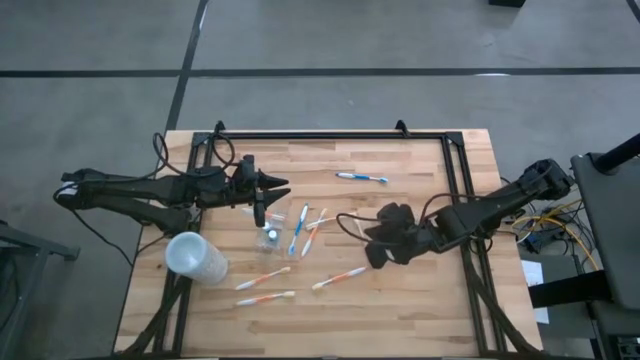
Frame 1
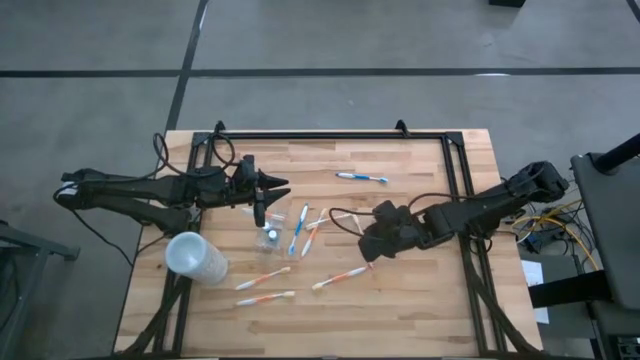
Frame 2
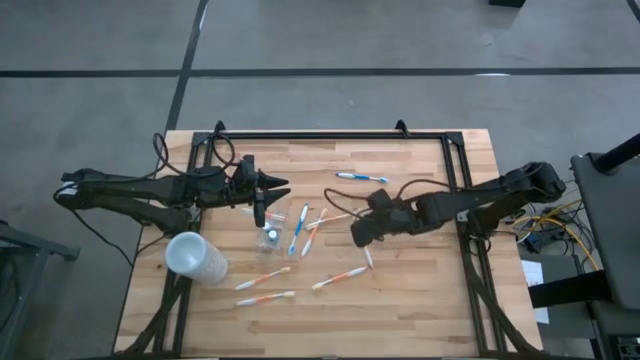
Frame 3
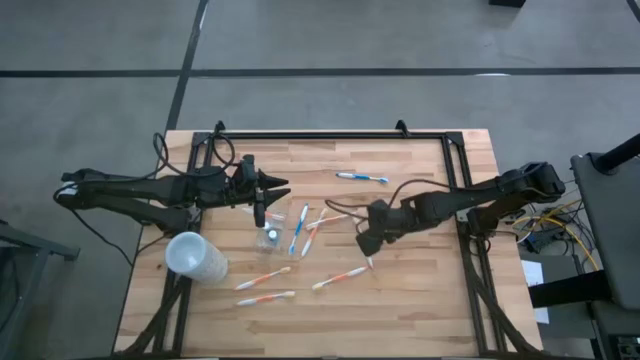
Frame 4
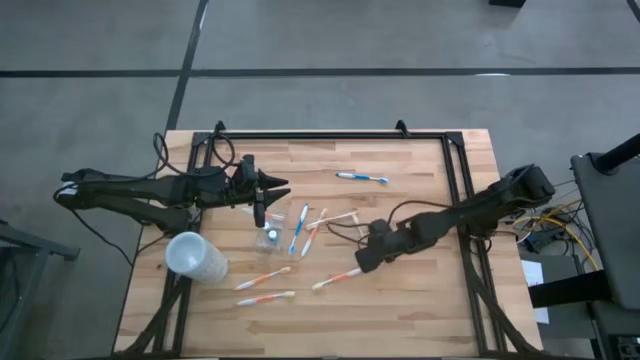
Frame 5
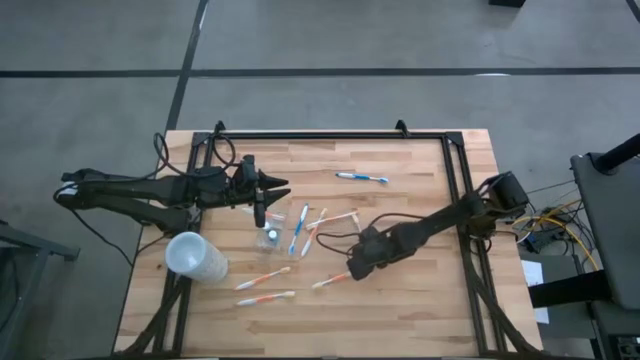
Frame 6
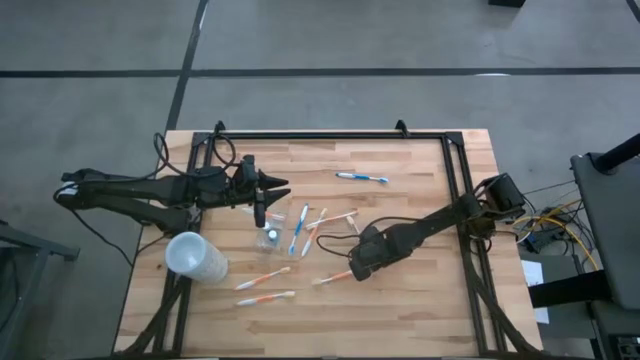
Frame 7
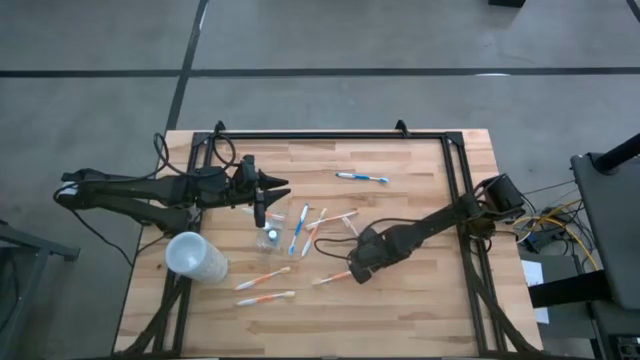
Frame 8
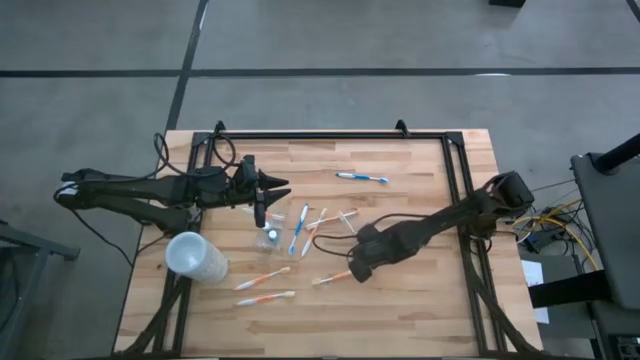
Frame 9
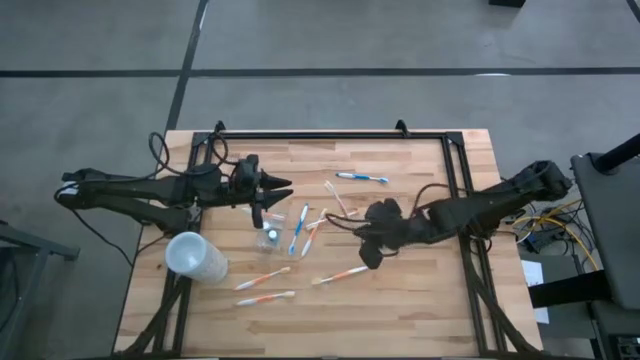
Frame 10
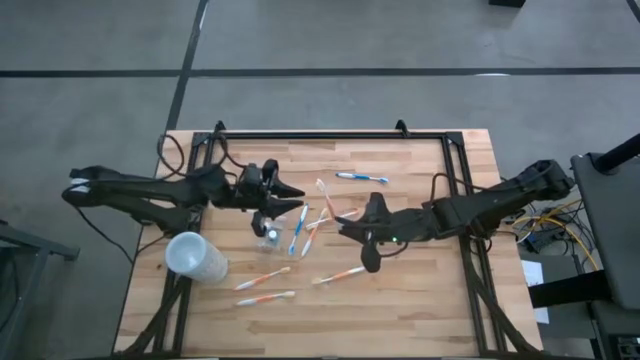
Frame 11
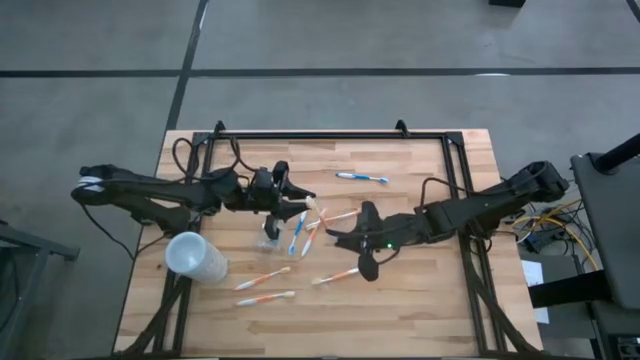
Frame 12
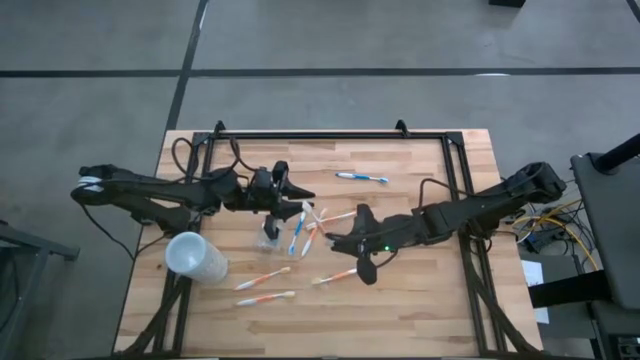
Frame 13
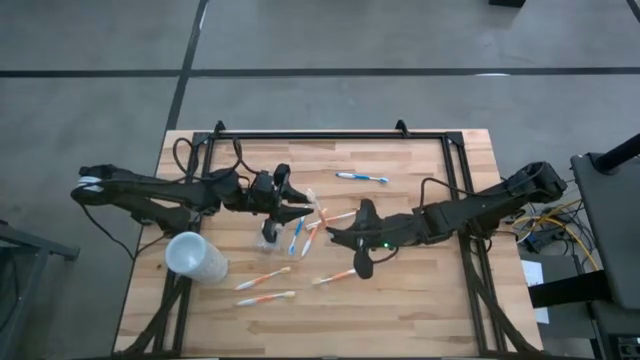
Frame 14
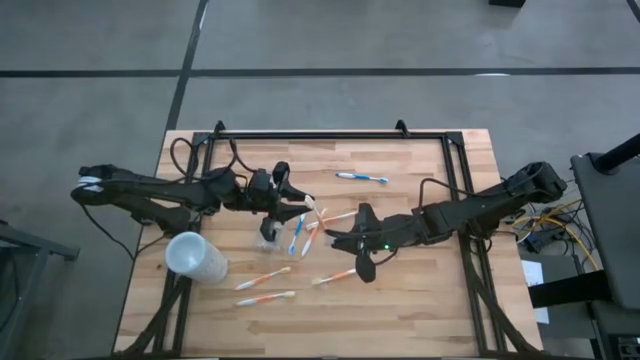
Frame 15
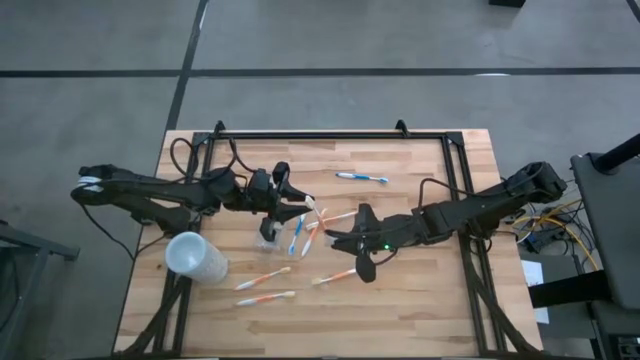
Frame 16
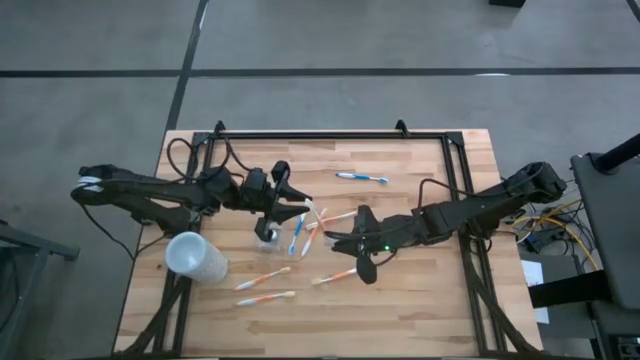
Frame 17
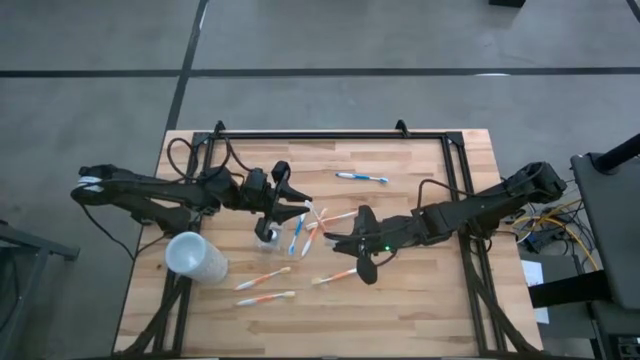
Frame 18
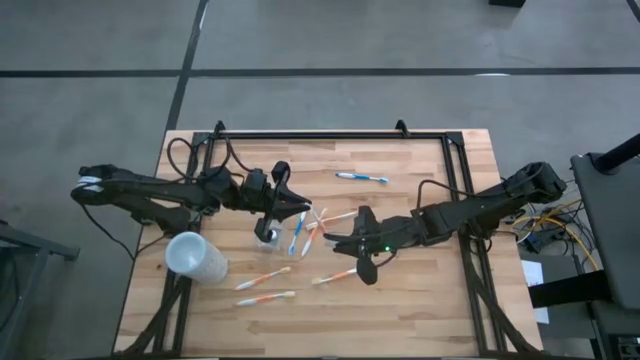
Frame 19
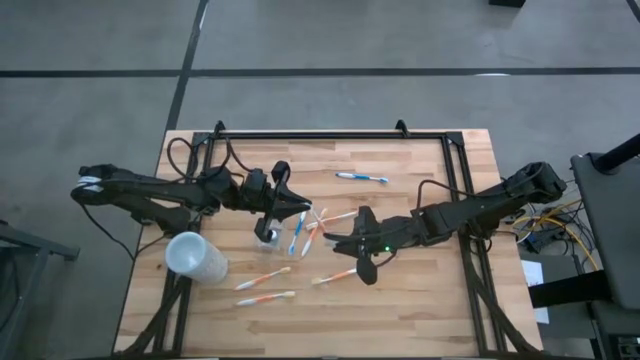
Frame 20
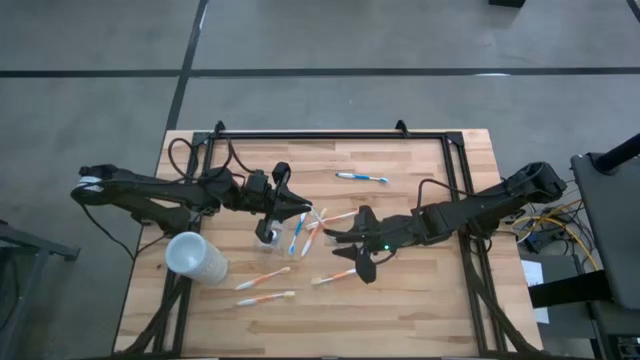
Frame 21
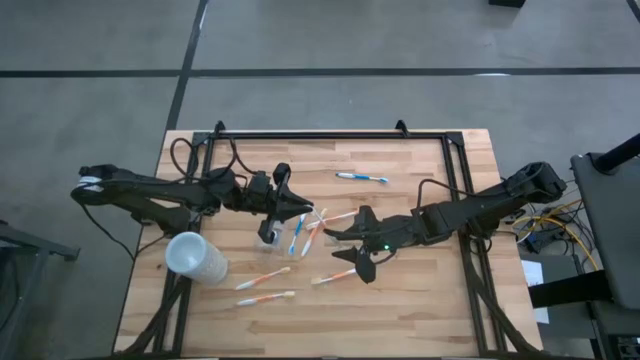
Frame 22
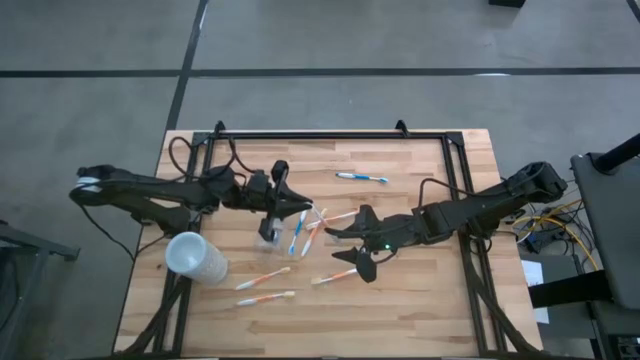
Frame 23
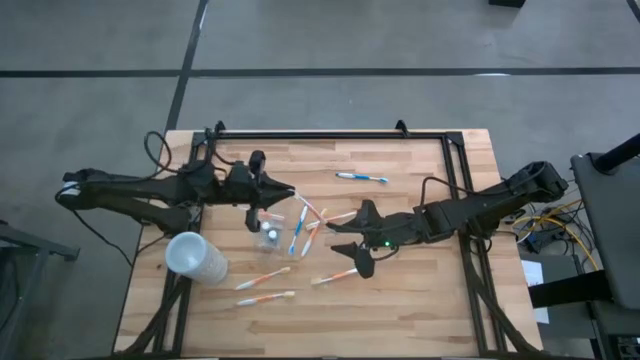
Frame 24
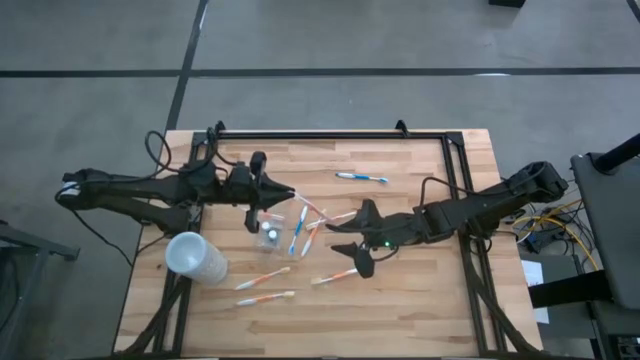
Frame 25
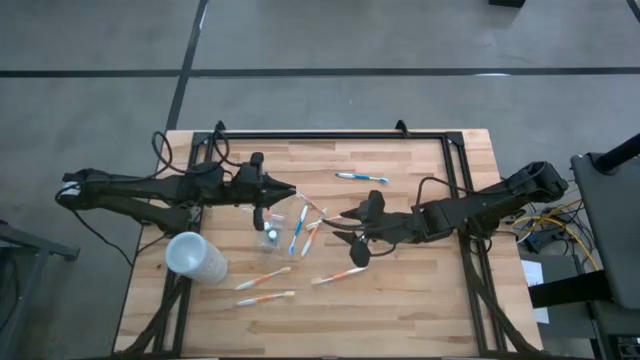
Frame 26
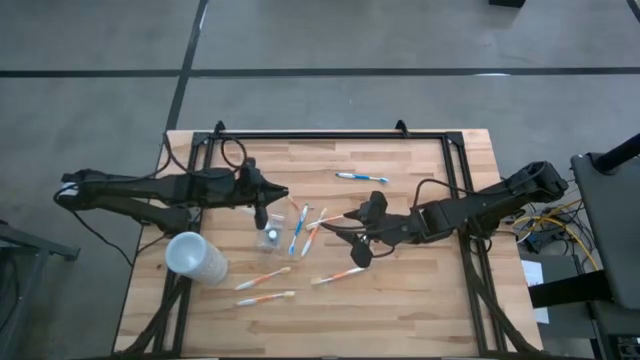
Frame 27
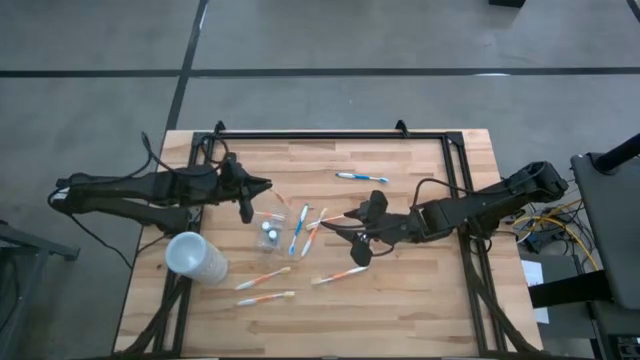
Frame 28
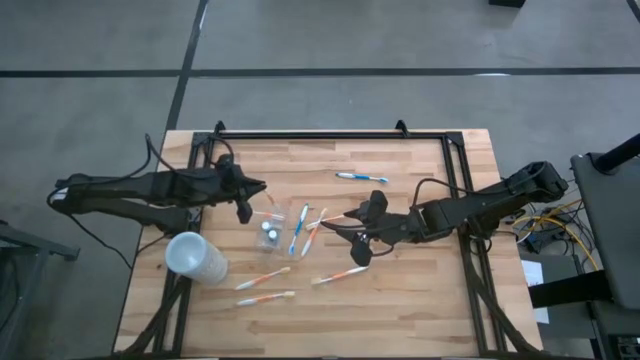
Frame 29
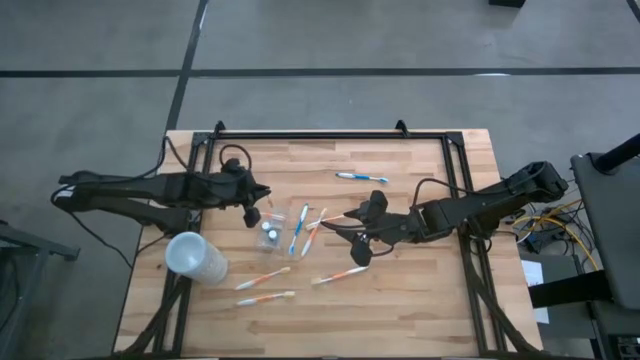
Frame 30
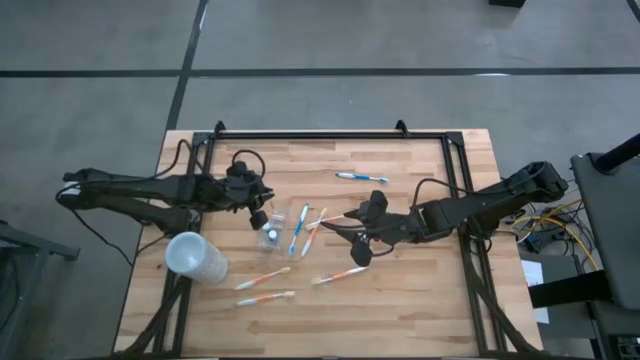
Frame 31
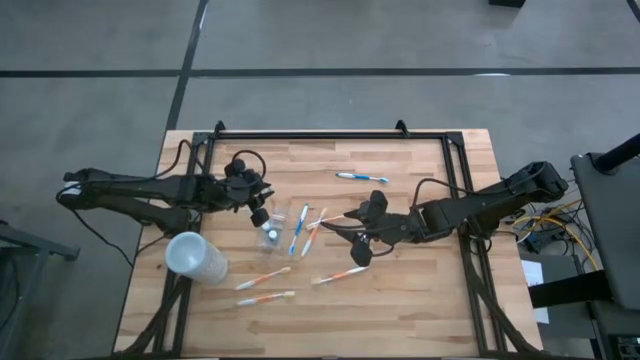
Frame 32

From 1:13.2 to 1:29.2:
Task: Pick & Place toothbrushing station
Put the orange toothbrush into the transparent organizer

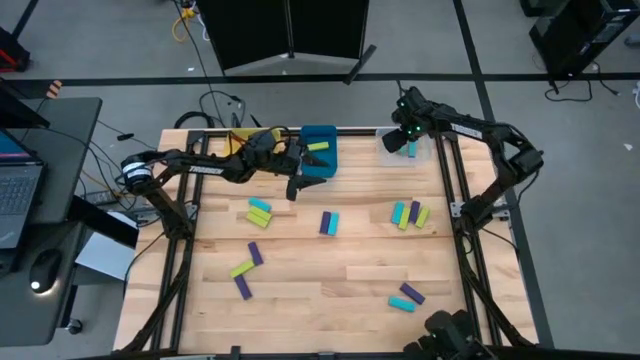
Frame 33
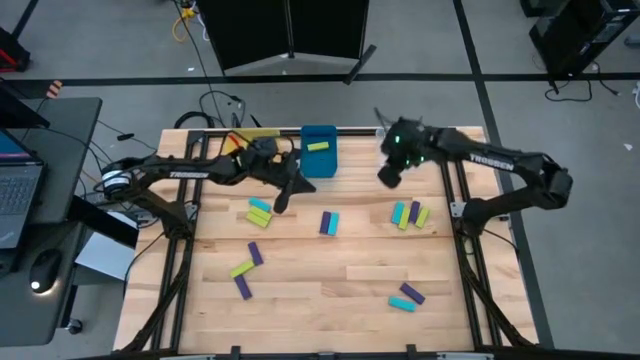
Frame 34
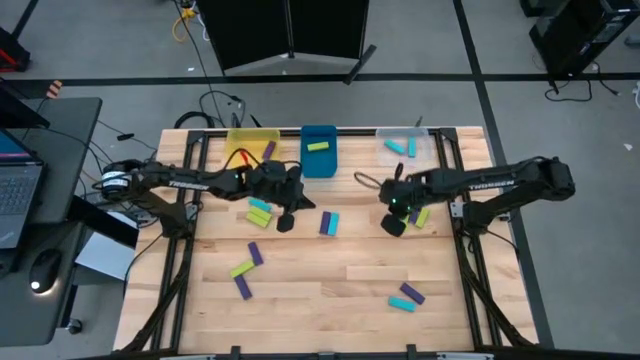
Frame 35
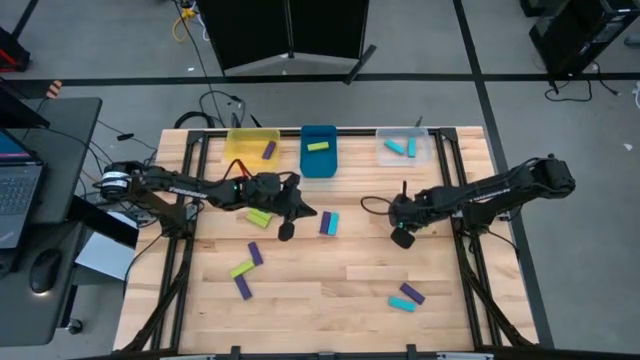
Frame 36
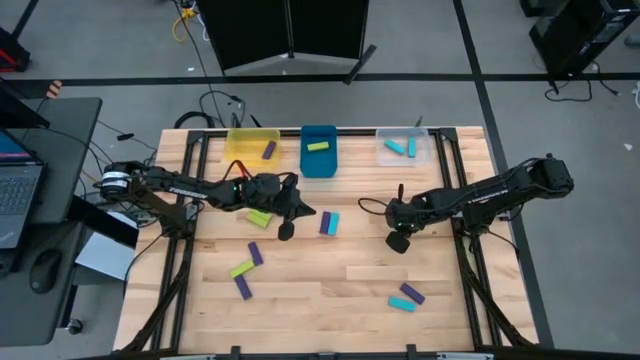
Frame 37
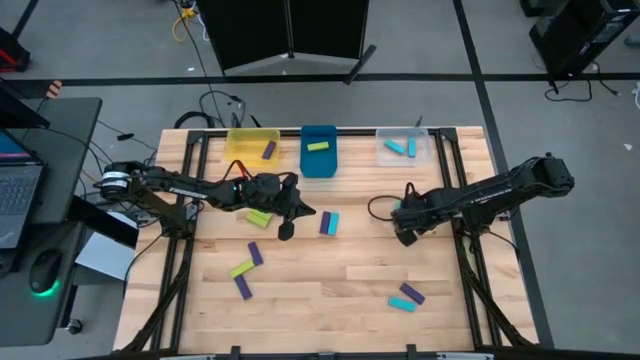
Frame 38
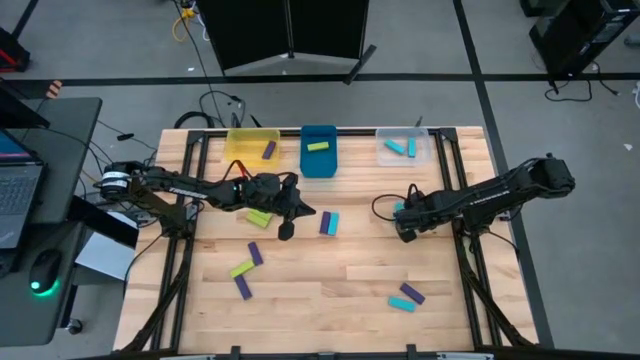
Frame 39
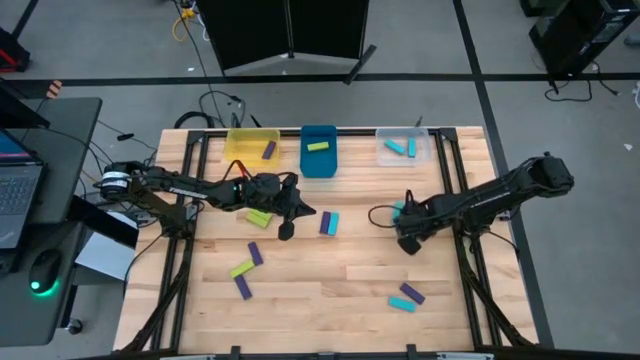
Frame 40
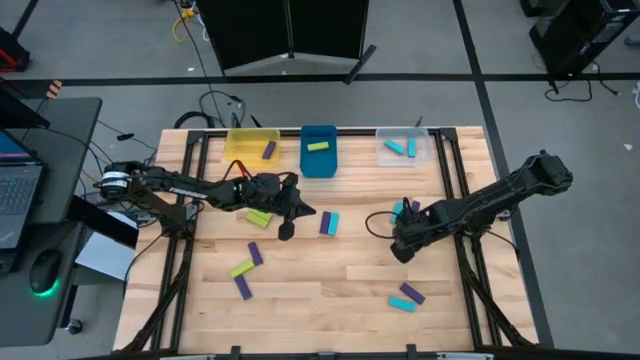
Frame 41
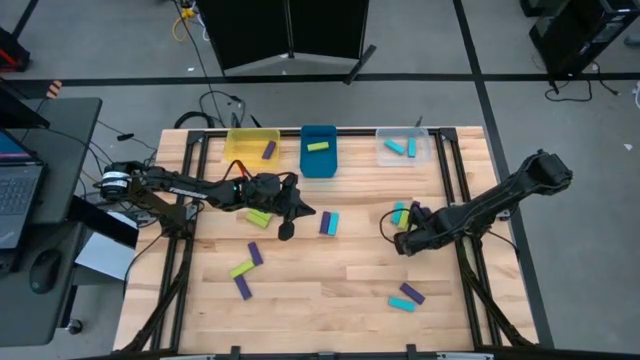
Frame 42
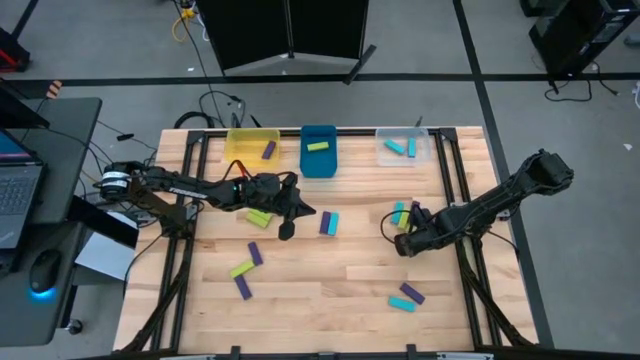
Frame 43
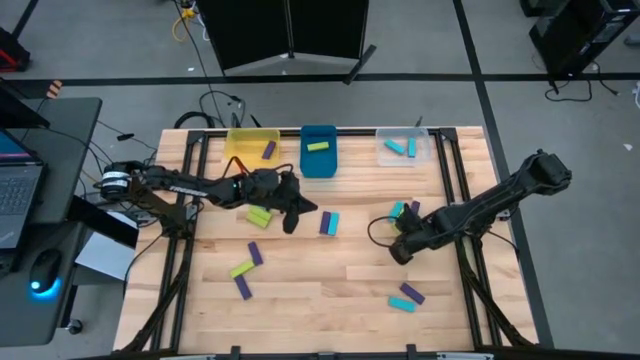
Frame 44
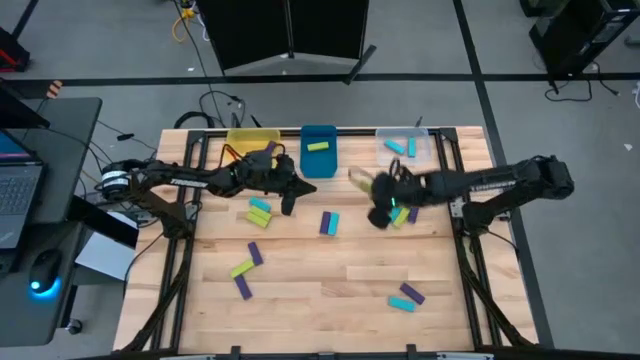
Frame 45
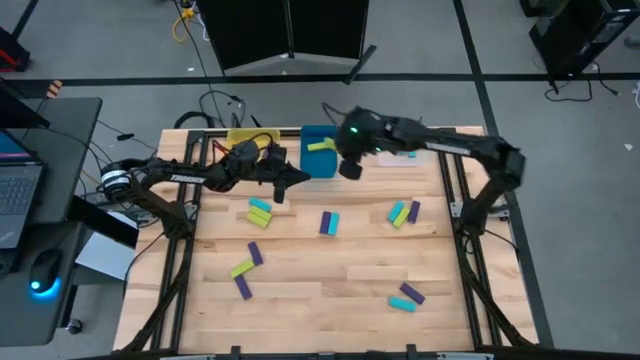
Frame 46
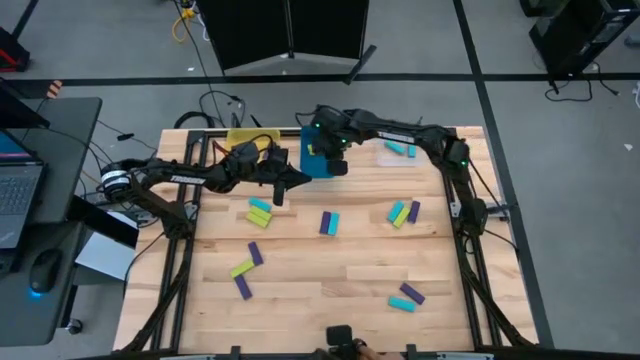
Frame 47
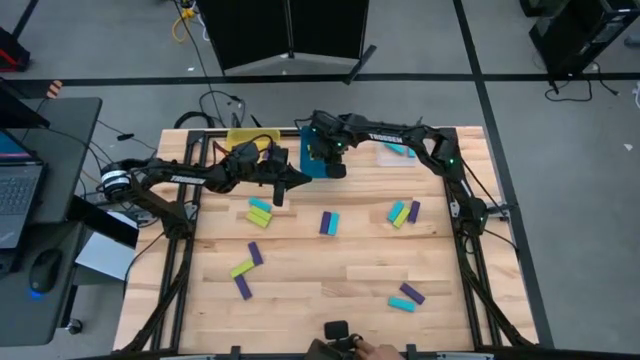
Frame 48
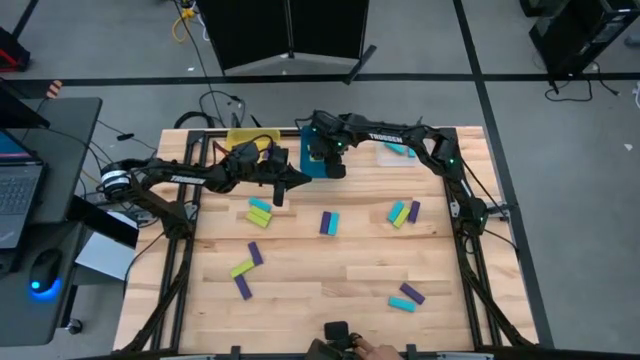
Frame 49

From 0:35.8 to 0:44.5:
Task: Sort blocks
Put the green block into the blue bin
